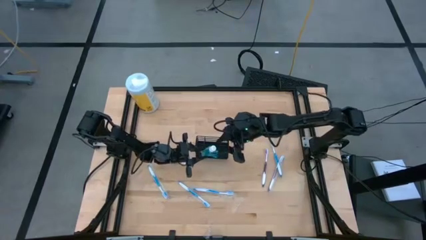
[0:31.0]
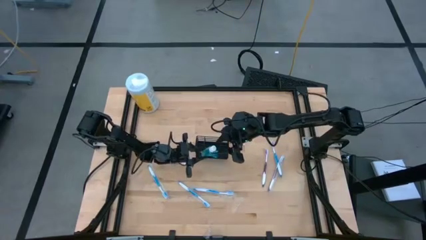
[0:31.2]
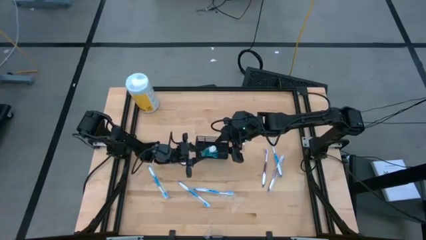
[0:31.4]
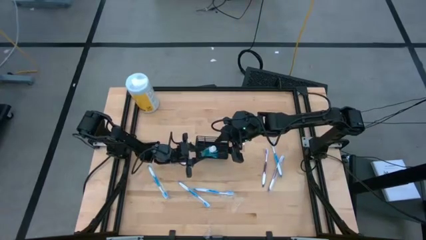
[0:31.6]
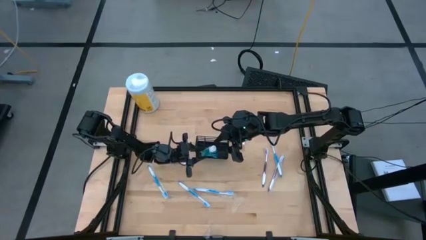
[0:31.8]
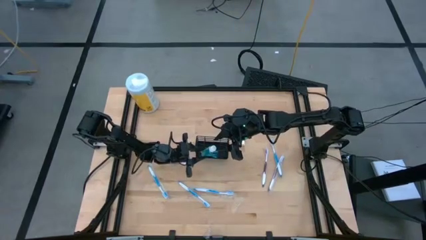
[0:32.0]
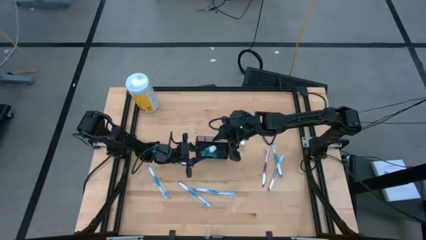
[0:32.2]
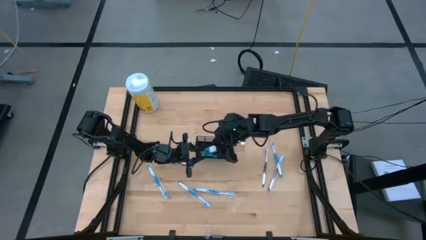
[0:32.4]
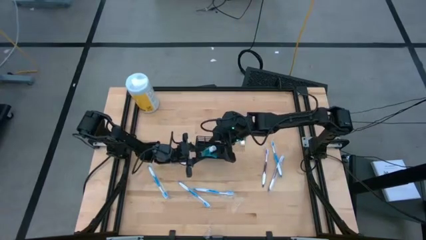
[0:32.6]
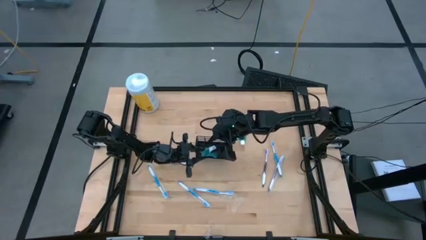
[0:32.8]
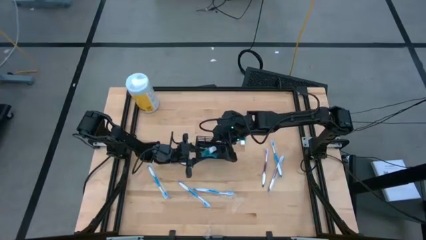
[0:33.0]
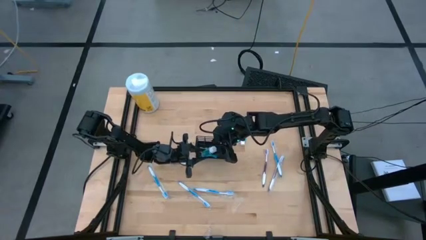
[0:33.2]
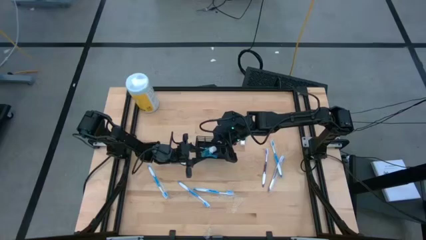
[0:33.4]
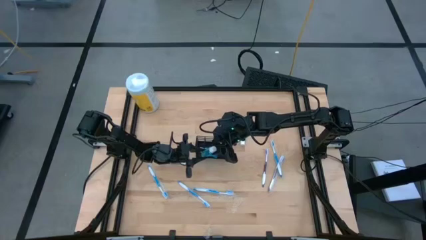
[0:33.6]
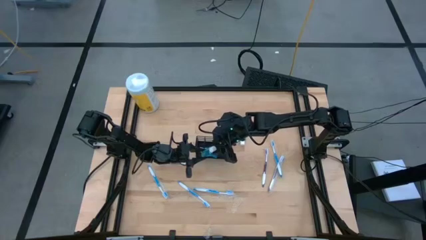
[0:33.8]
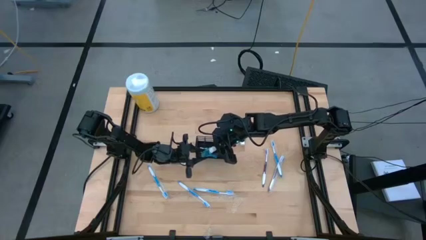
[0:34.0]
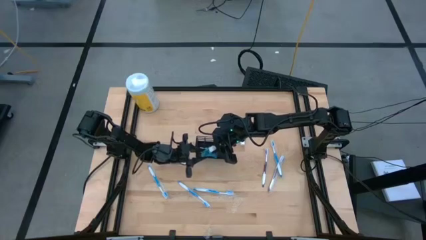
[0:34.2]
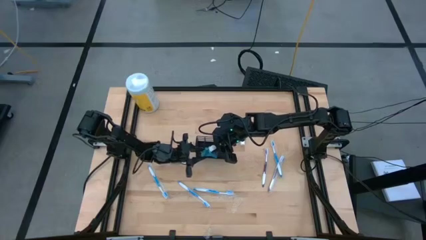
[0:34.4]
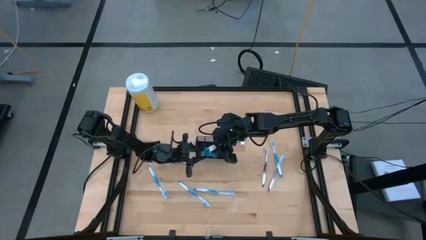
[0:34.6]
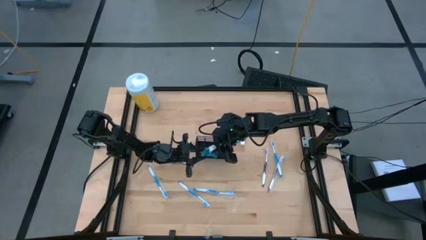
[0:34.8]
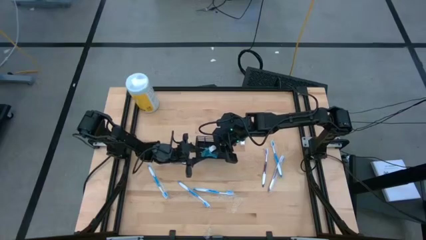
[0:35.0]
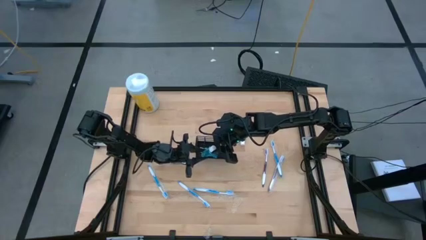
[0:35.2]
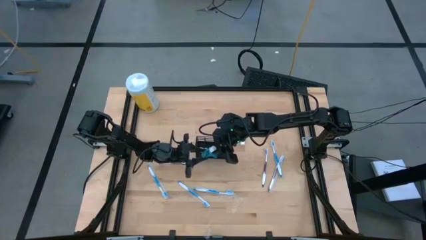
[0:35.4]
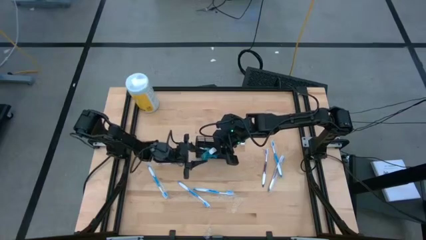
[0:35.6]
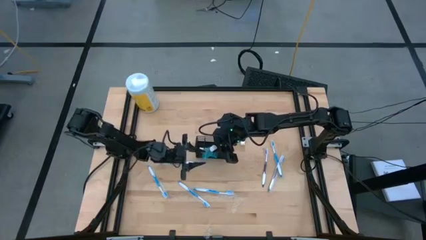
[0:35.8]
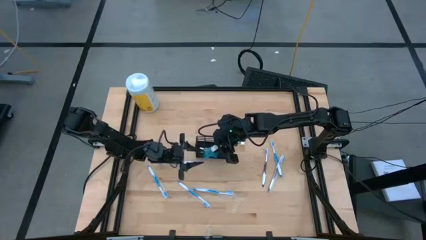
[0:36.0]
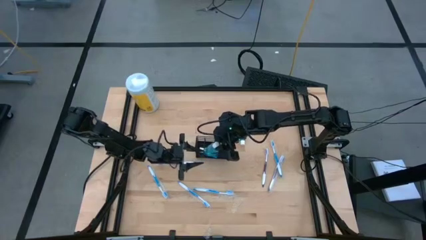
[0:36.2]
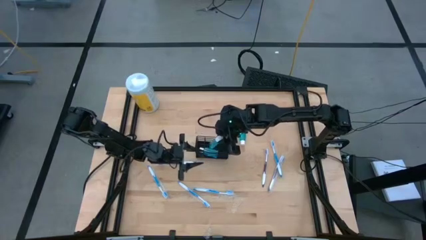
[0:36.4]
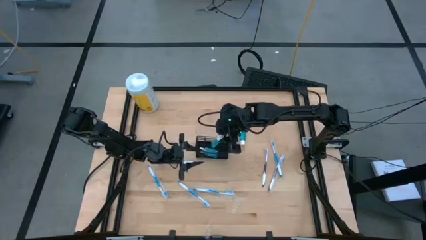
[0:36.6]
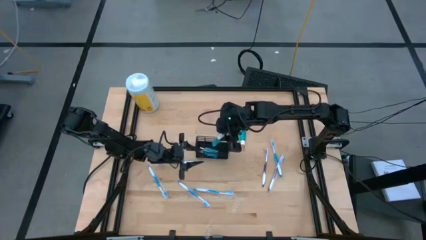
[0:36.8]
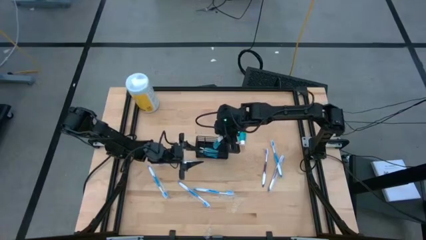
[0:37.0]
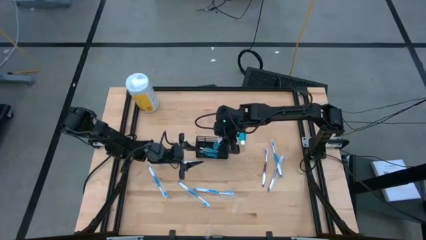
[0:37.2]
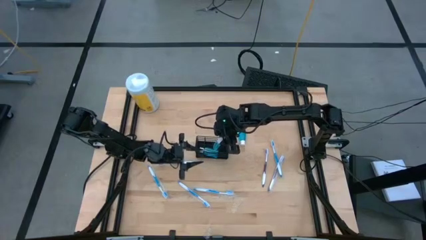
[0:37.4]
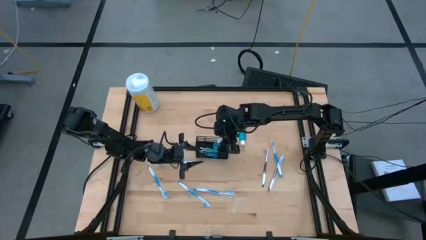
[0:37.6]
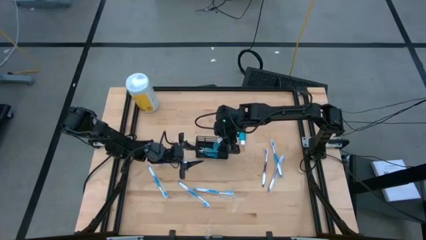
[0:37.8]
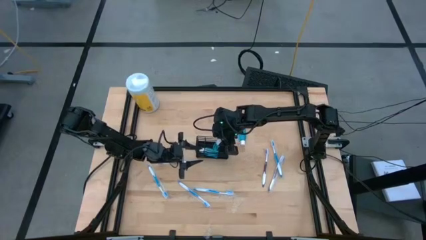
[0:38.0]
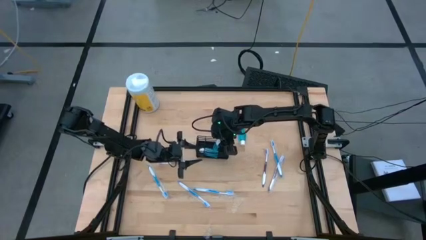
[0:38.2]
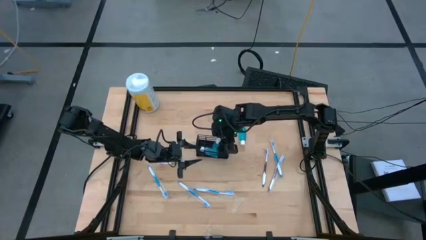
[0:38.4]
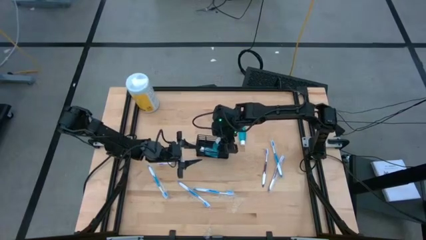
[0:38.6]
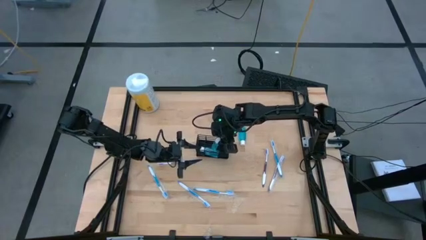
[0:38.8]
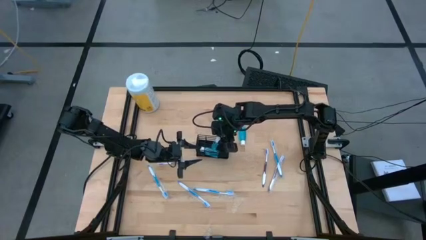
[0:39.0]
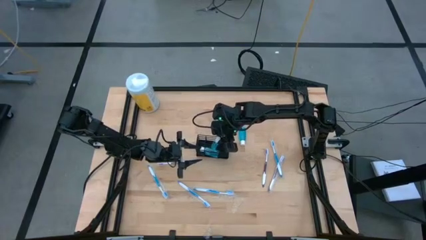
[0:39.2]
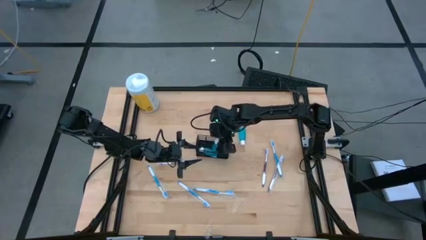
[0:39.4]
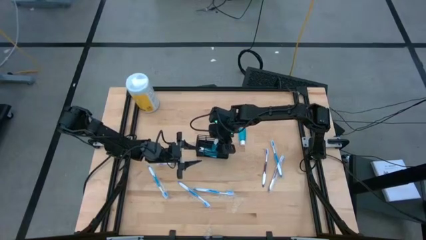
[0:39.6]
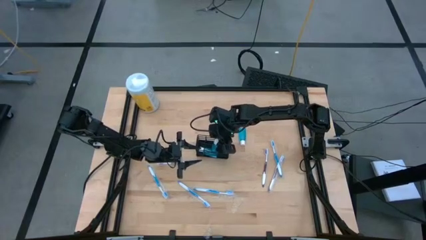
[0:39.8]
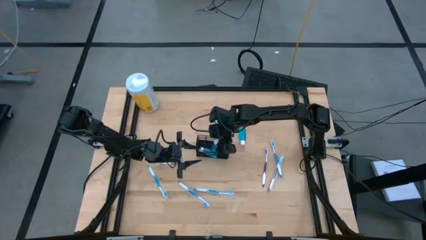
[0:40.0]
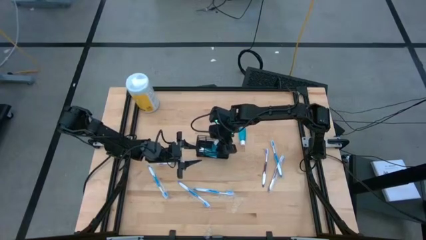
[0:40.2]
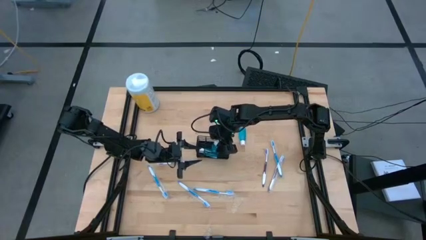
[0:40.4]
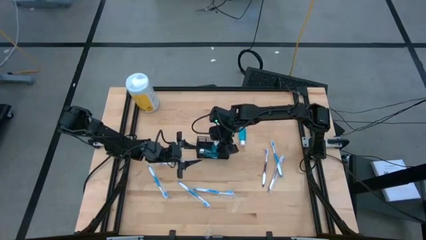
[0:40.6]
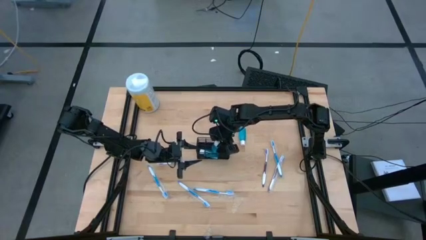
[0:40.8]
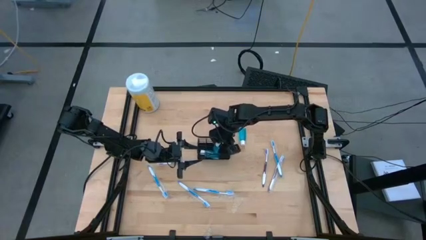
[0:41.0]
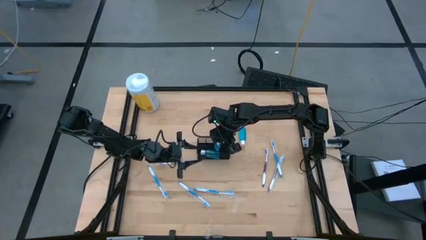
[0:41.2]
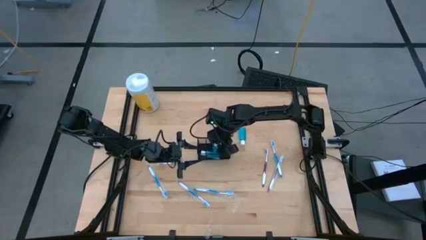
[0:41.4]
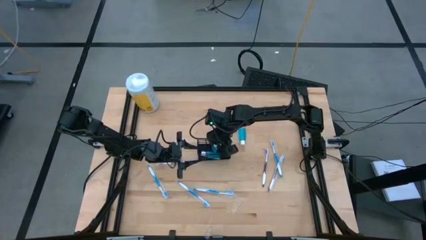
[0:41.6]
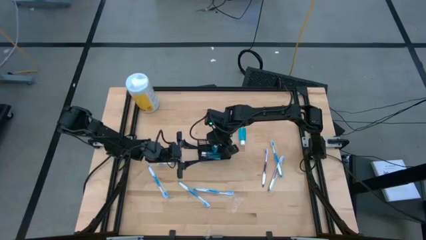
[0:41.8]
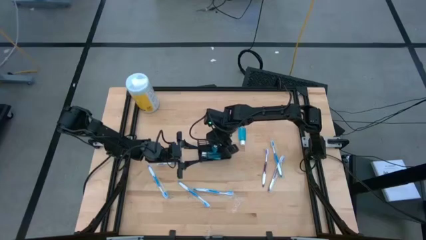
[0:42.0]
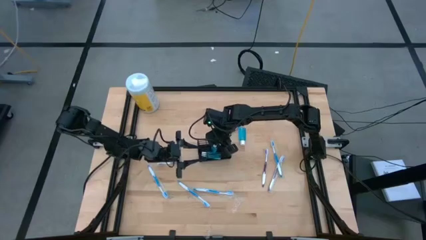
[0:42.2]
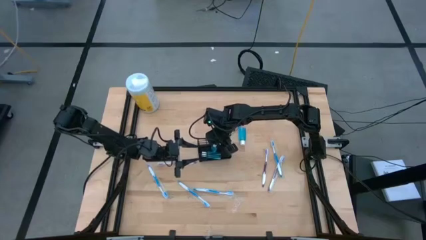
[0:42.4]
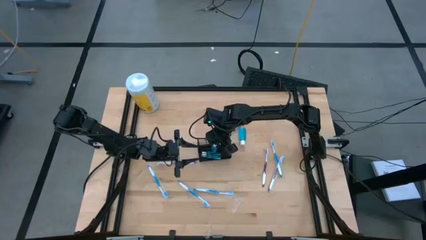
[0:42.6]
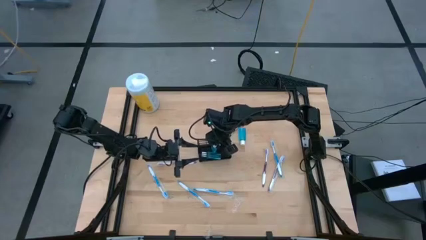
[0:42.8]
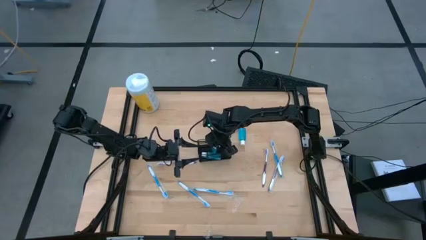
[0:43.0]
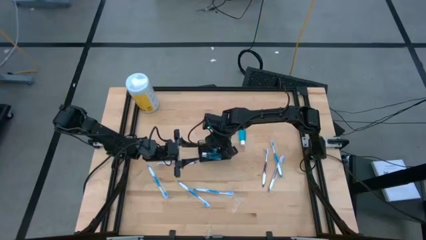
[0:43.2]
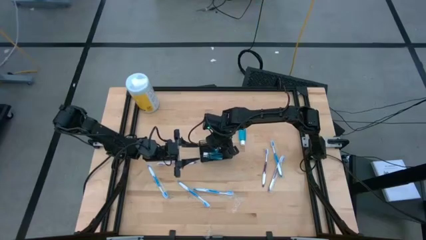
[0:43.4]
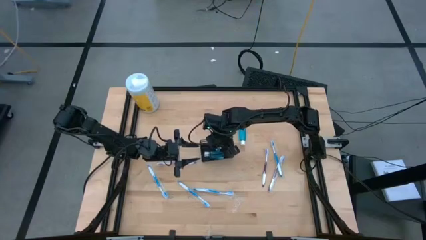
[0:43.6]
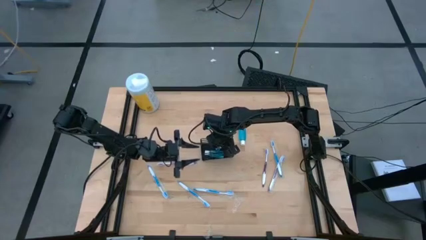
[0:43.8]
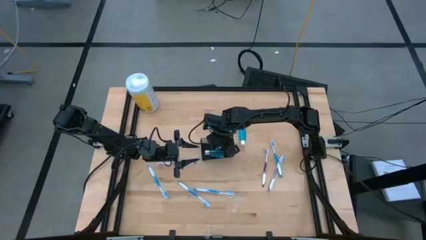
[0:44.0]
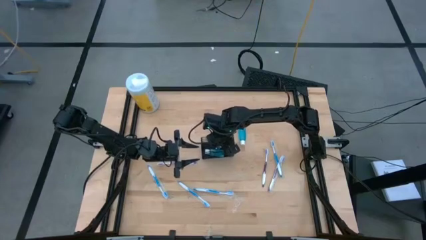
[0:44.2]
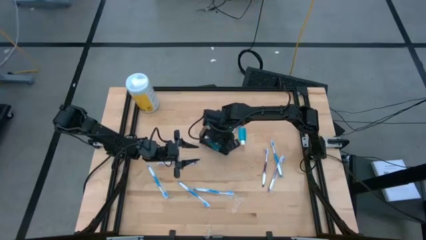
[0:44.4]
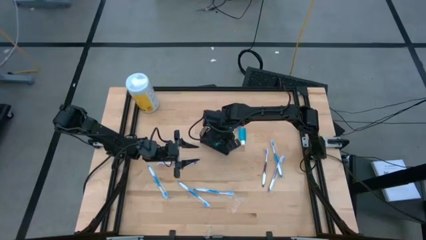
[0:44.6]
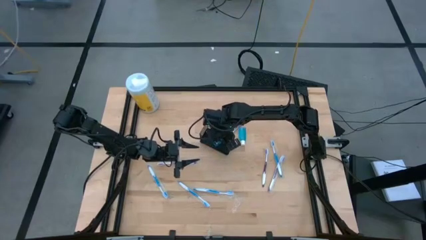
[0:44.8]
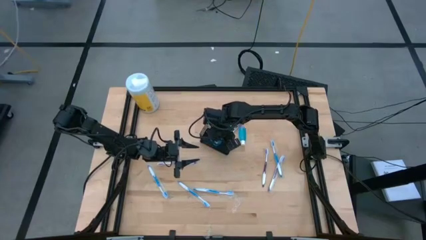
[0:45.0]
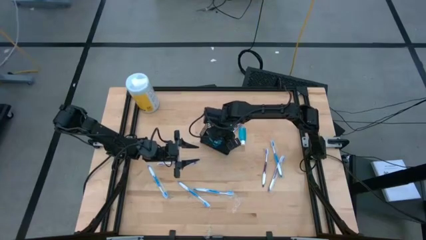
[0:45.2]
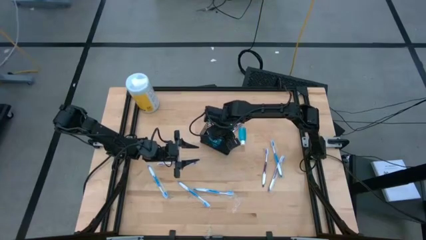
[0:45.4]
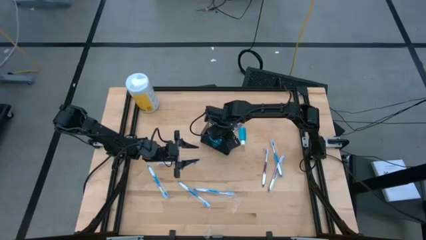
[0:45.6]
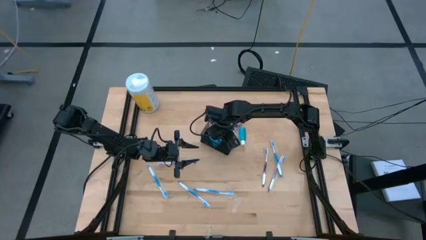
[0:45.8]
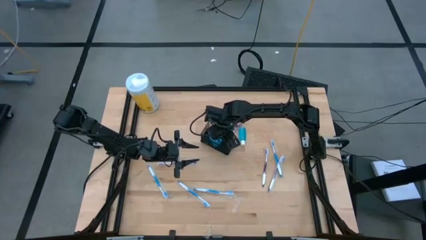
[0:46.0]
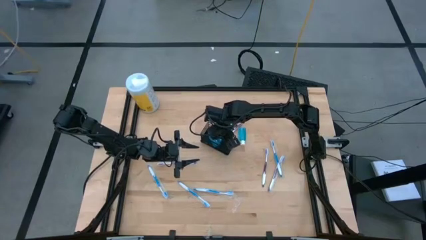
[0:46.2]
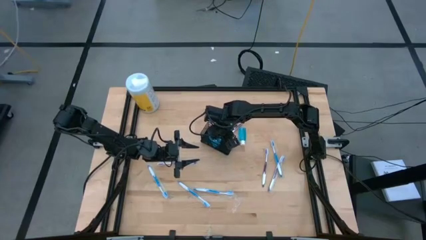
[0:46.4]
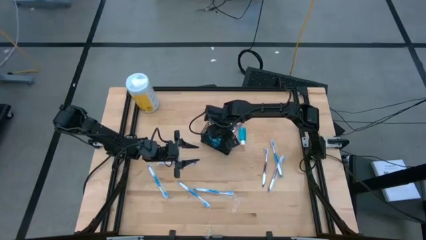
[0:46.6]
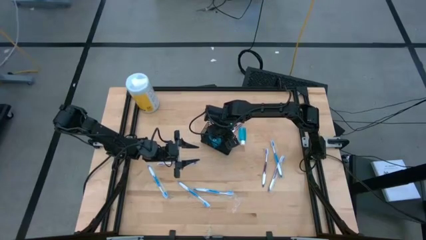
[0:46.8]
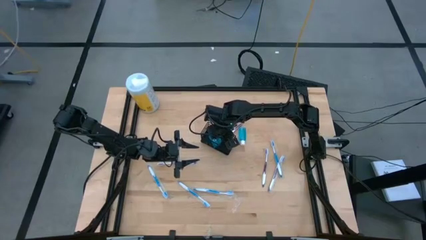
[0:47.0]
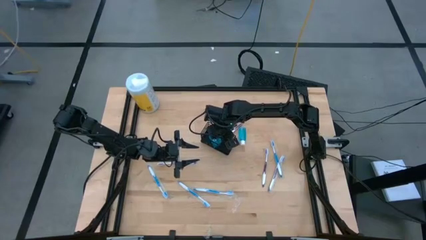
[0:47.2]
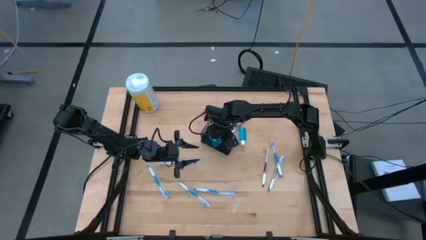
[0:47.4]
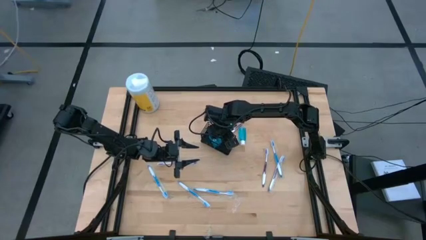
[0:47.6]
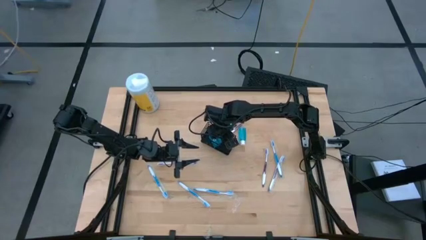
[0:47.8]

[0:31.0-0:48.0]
Task: Pick & Place toothbrushing station
Put the blue mouthwash into the wire organizer
